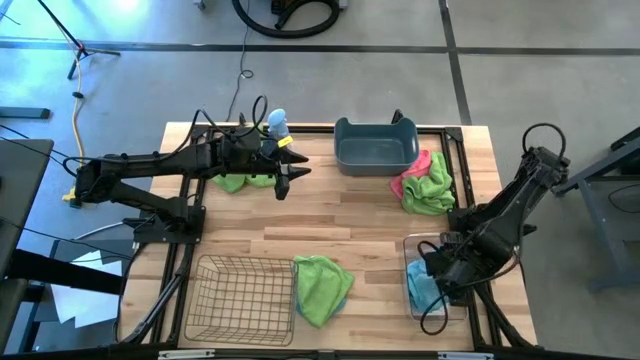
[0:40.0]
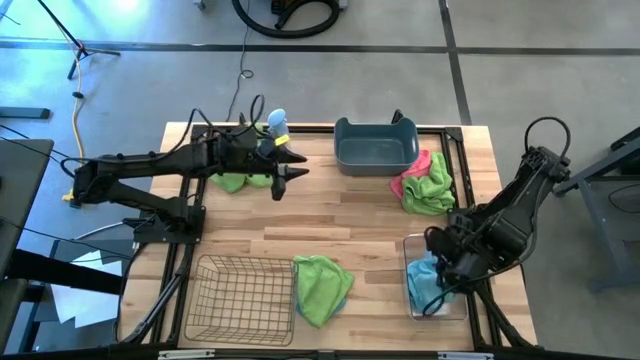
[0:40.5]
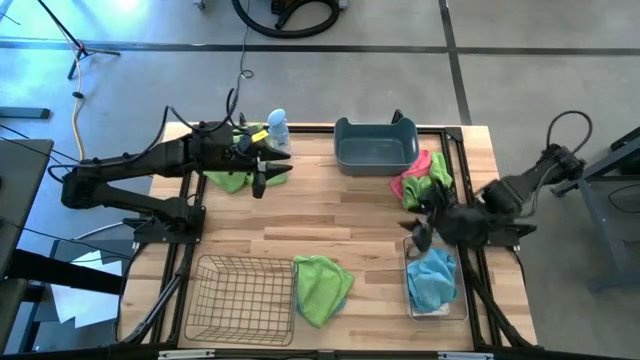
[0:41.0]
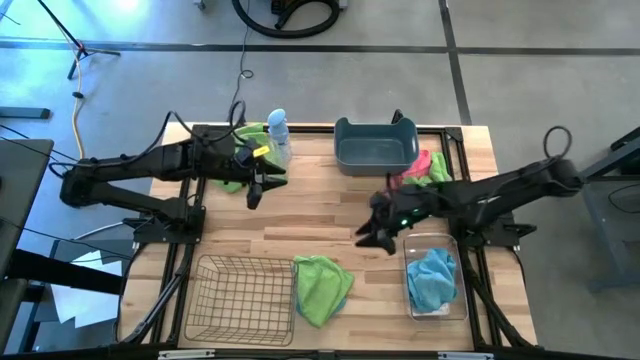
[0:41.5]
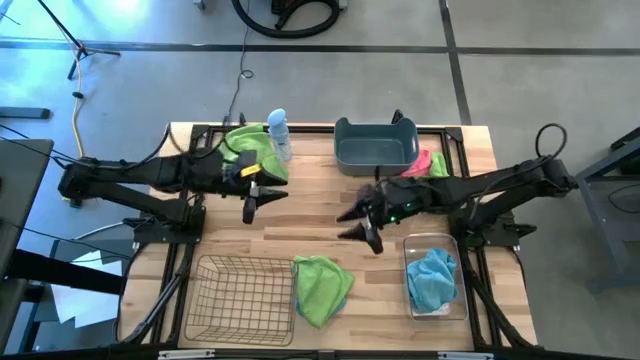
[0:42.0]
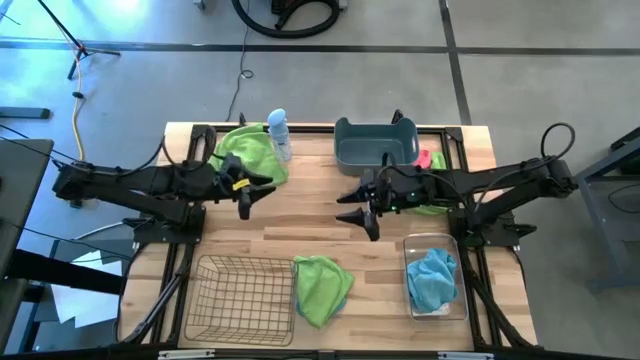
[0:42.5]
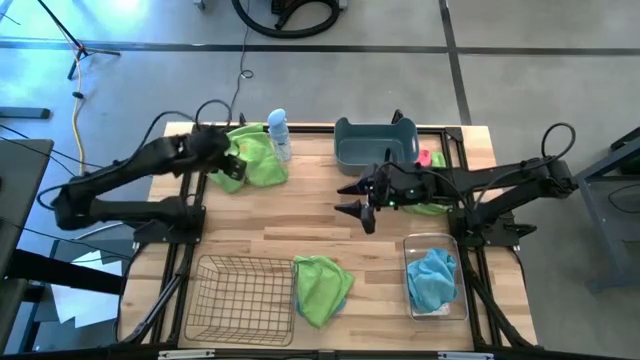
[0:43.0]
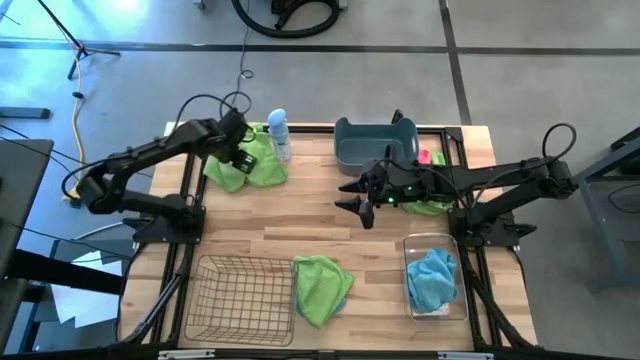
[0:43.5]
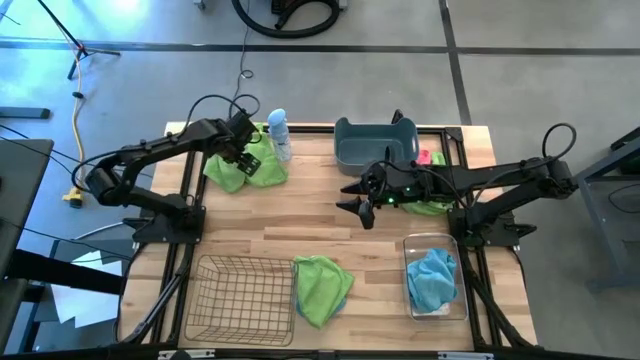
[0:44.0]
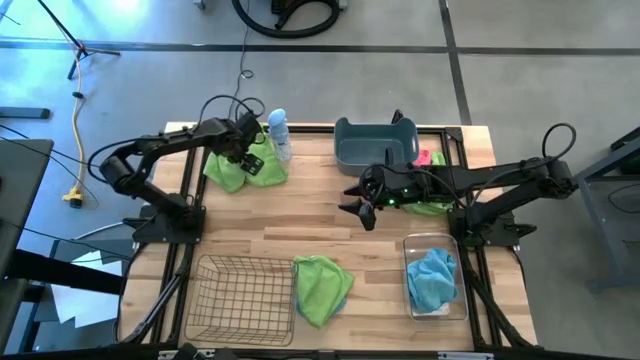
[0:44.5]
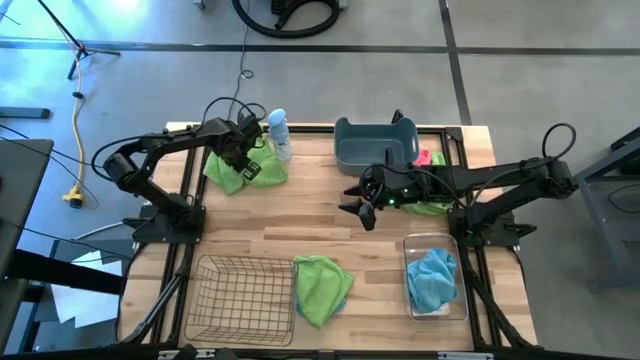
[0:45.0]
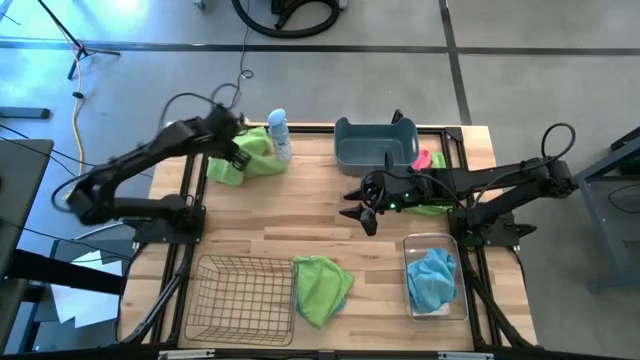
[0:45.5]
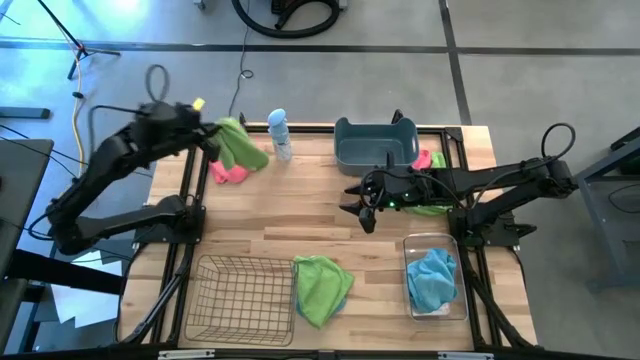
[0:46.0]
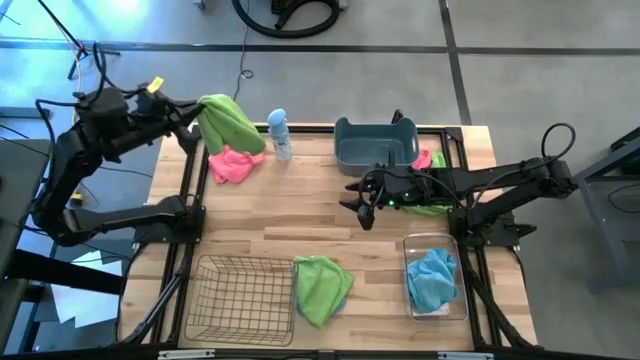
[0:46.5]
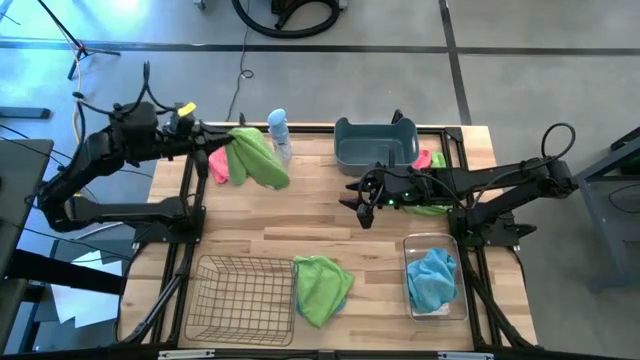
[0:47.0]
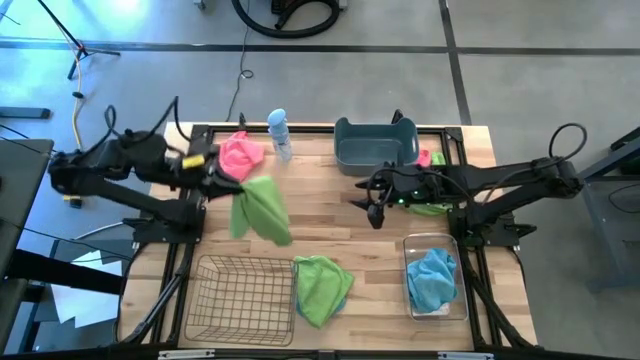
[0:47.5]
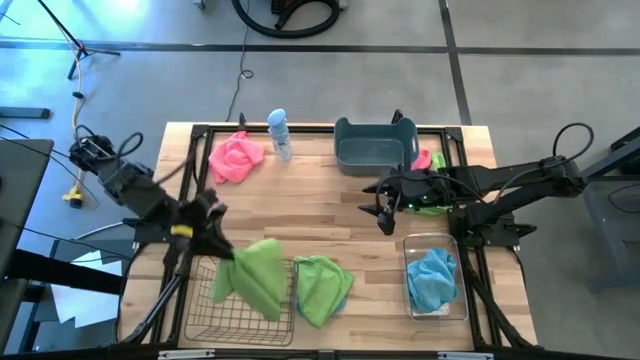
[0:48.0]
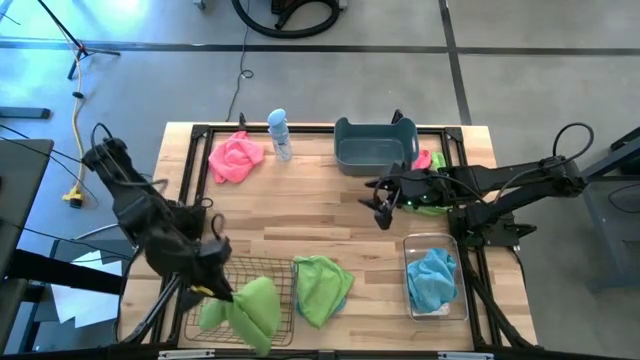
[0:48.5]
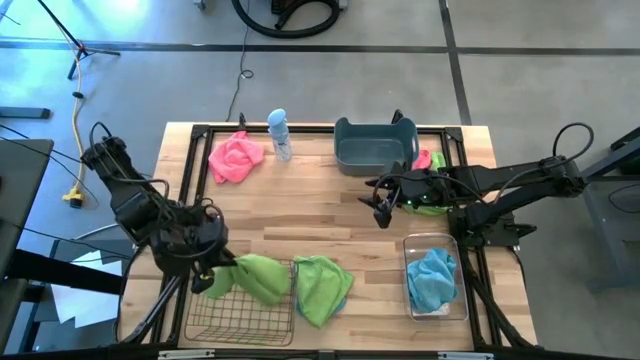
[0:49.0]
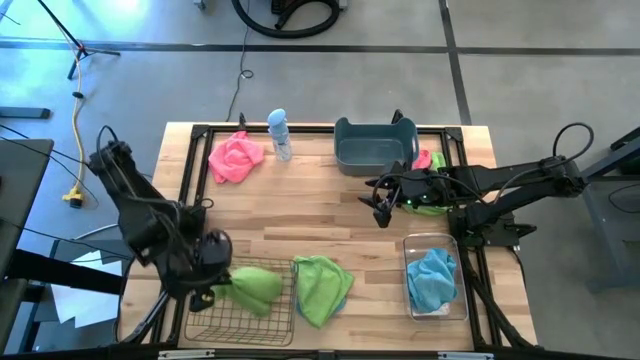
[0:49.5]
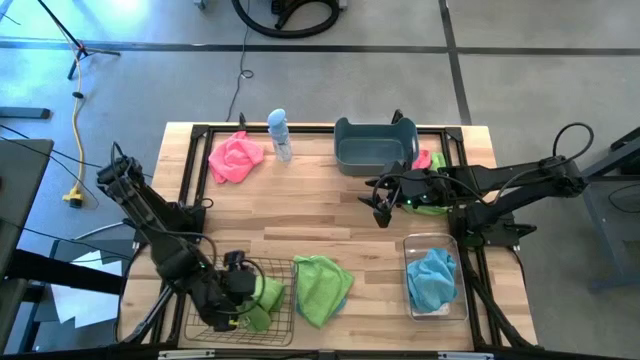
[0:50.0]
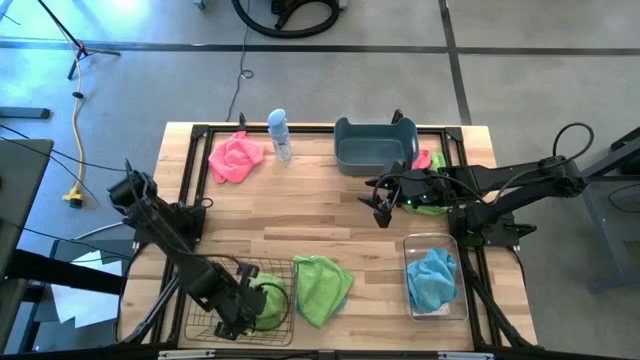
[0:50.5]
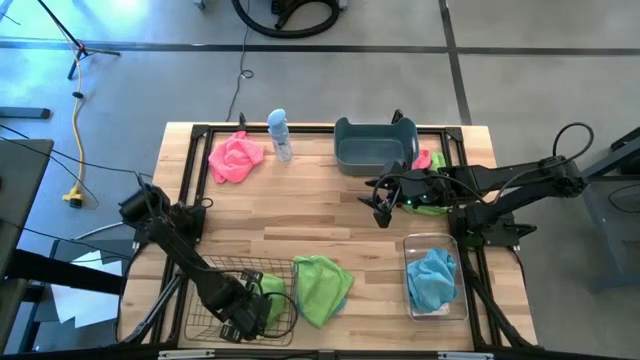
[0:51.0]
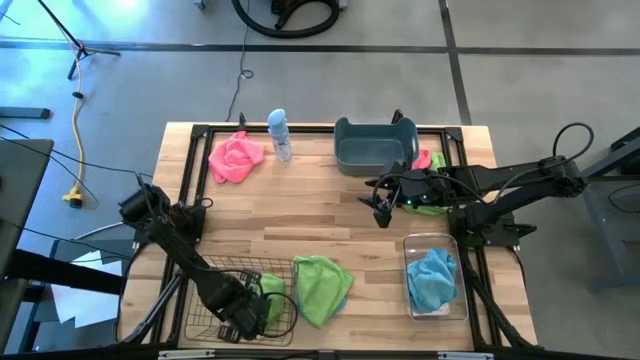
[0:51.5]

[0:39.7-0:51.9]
Task: Sort microfiber towel by color & place in baskets
Put the top left green towel into the wire basket

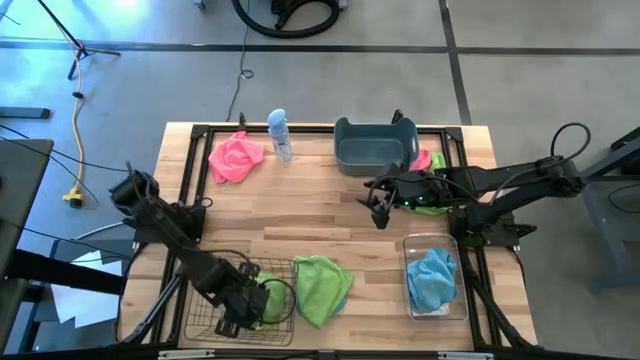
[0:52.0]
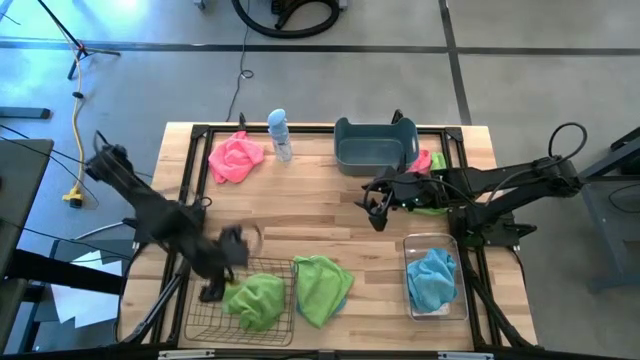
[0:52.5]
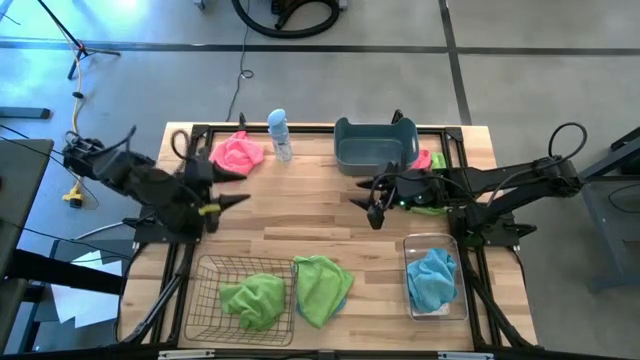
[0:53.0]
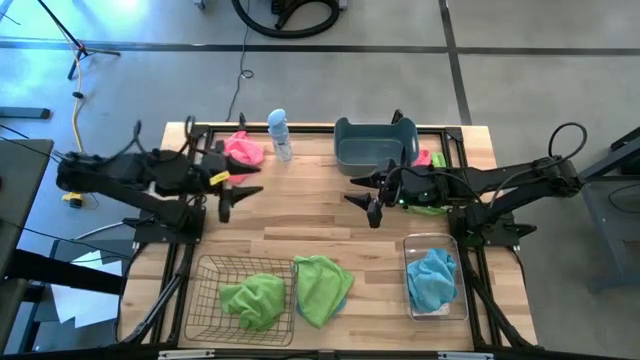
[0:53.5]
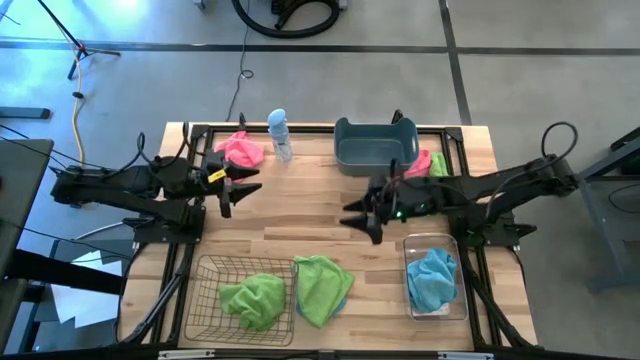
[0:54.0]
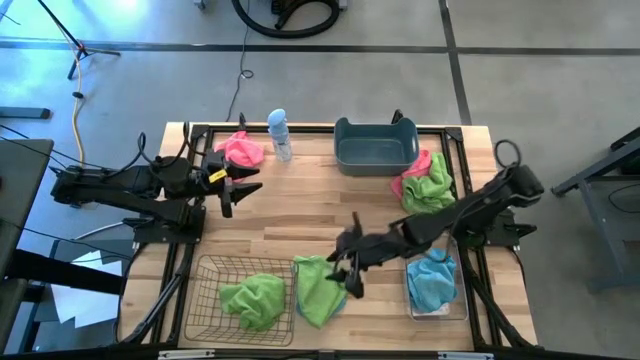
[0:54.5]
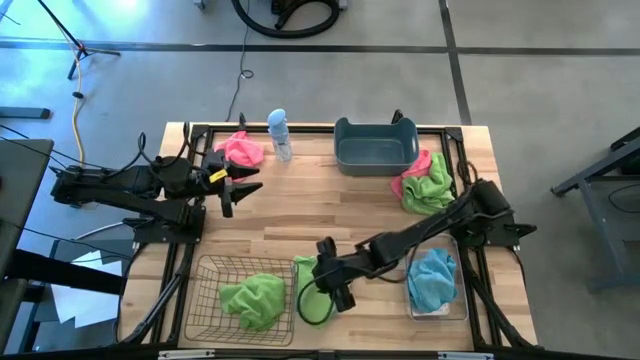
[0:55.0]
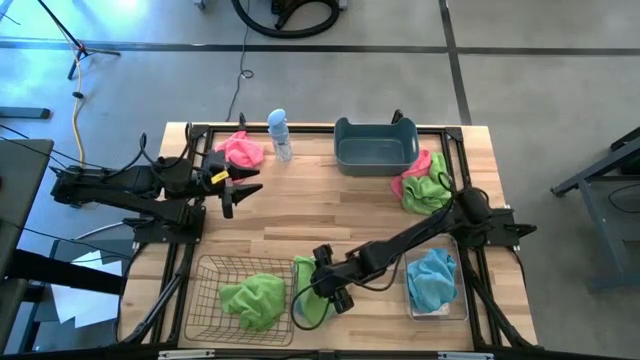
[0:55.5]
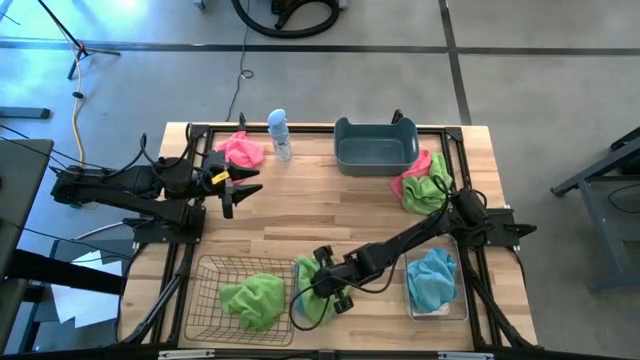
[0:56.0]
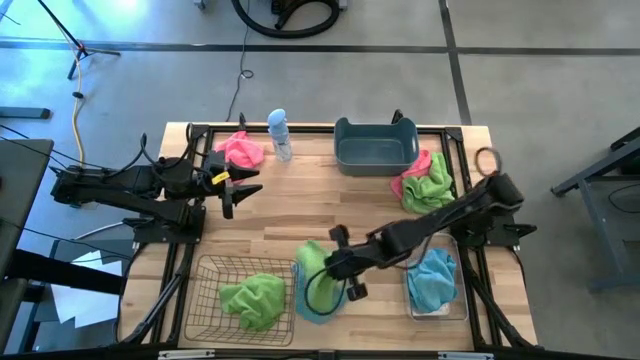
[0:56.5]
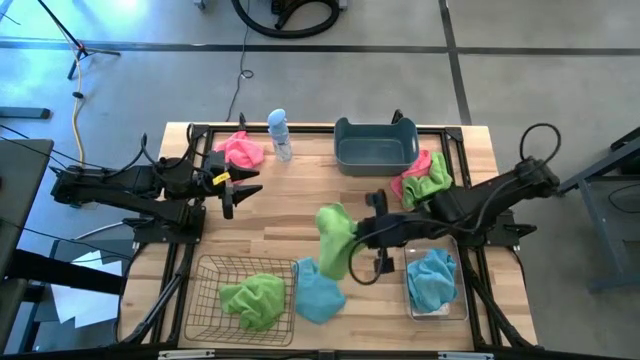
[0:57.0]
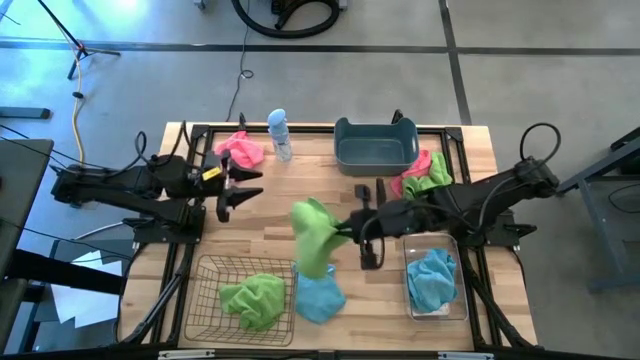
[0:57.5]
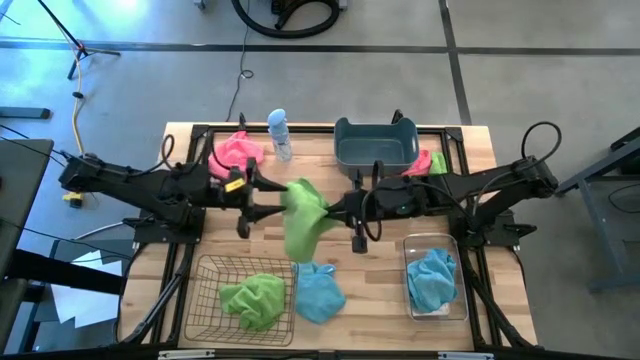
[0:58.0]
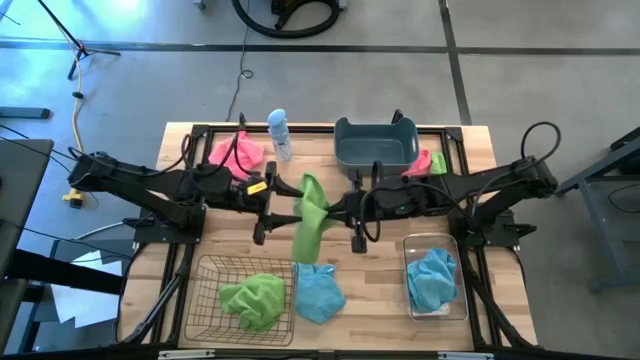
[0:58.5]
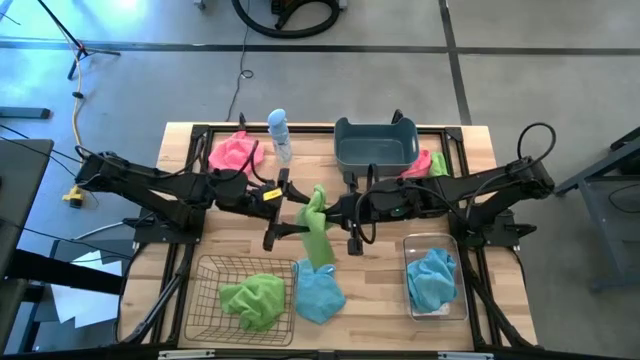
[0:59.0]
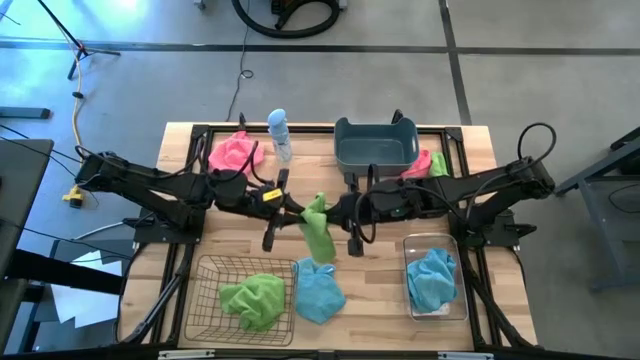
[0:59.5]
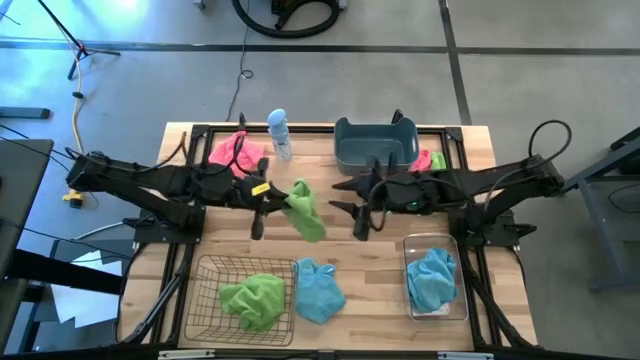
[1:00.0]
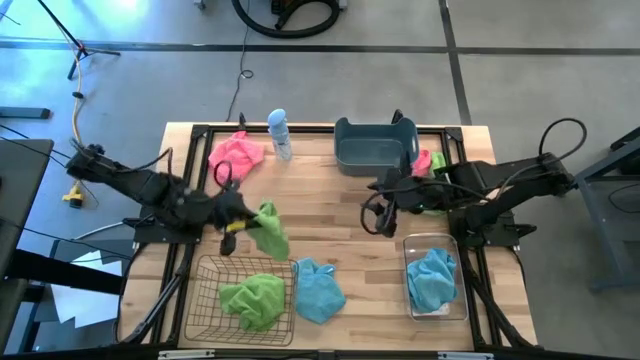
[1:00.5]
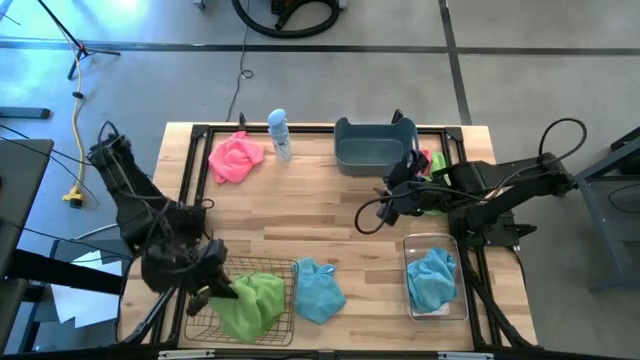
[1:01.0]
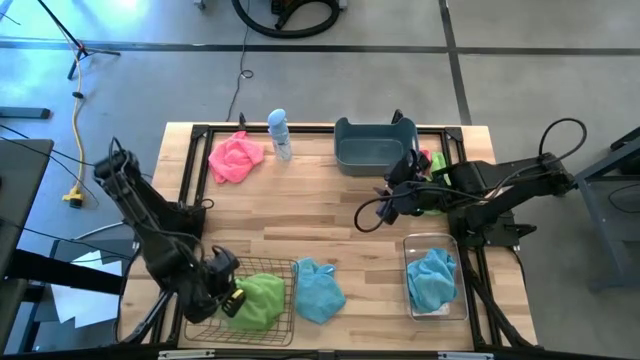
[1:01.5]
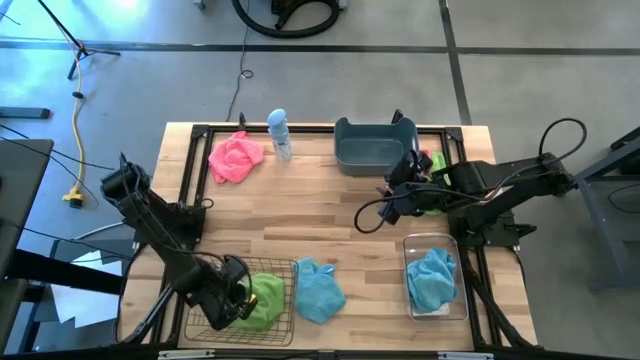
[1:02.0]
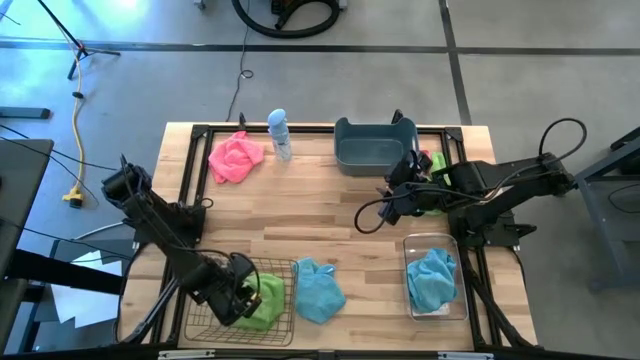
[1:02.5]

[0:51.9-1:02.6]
Put the bottom green towel into the wire basket
